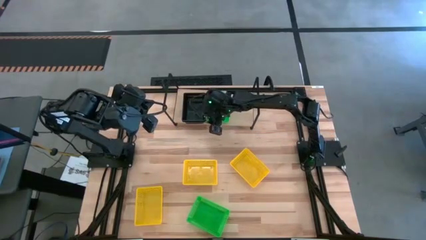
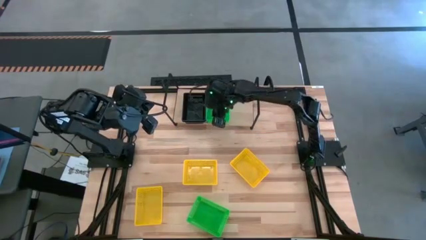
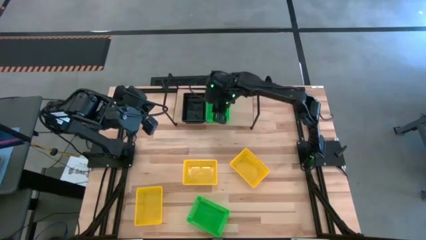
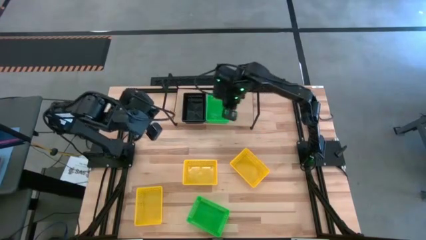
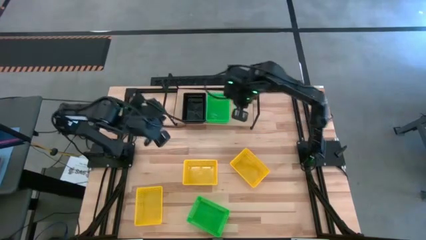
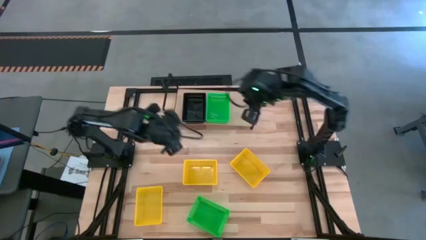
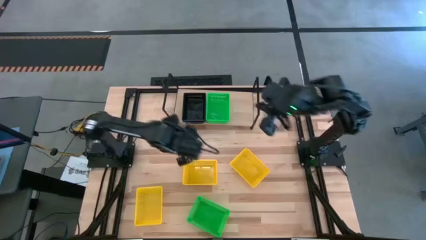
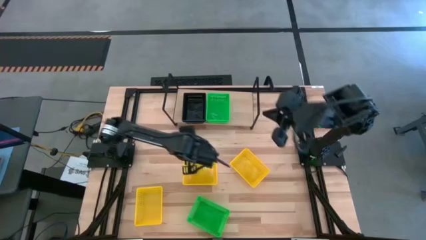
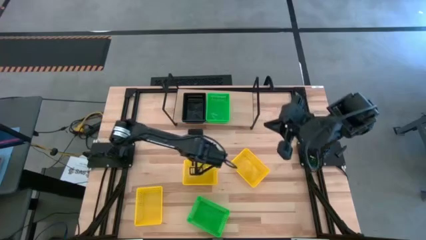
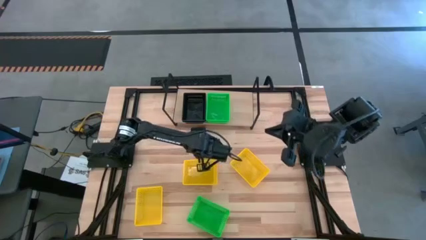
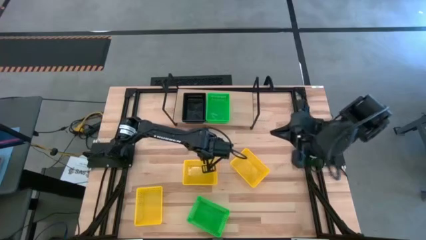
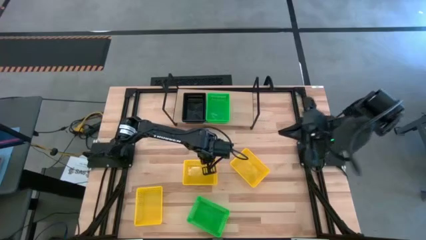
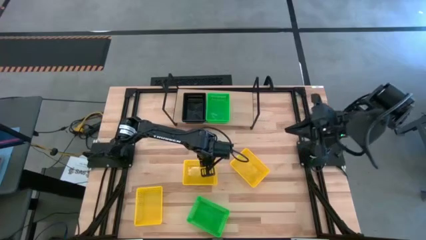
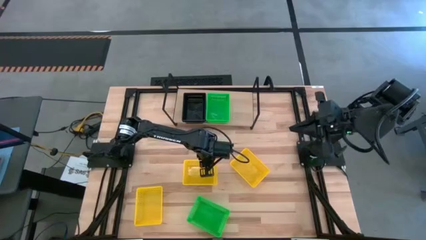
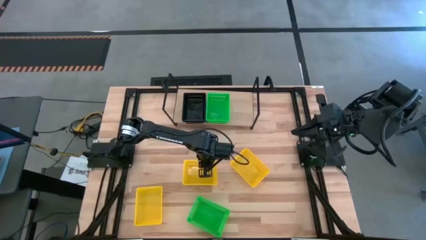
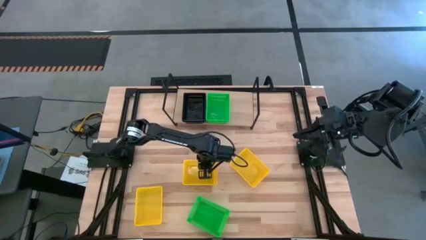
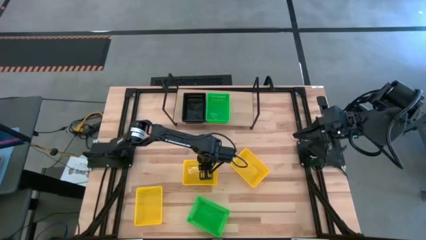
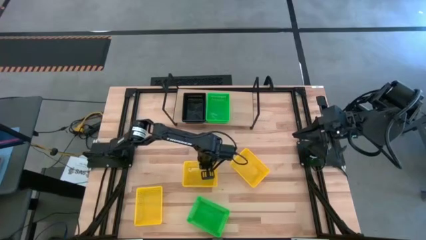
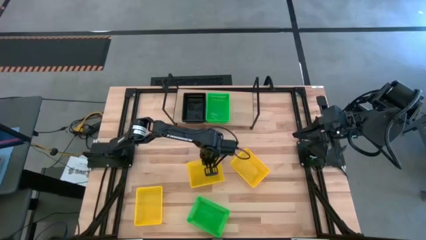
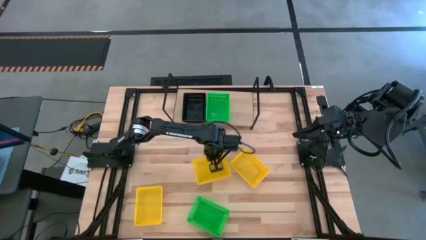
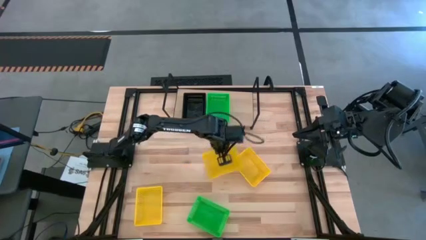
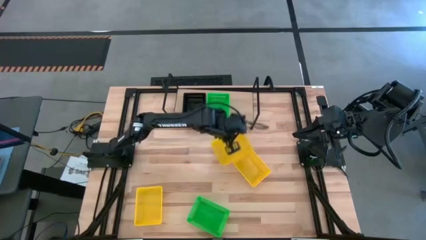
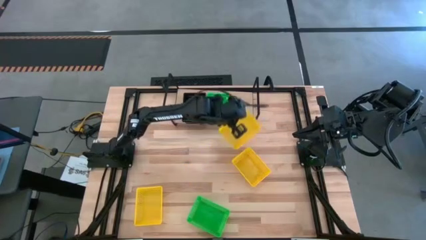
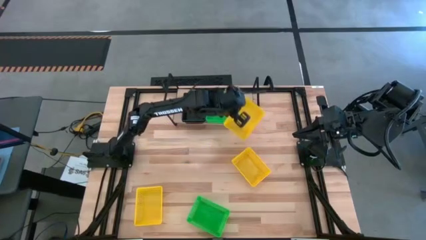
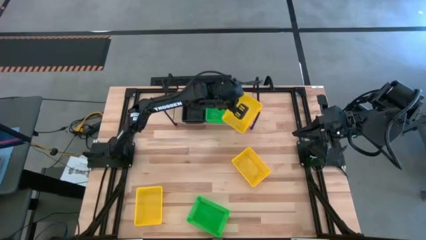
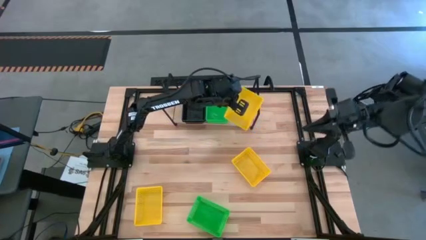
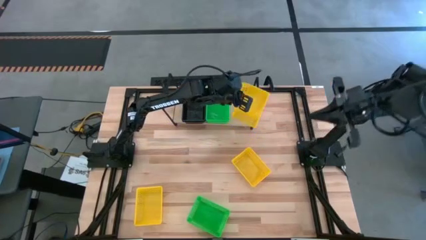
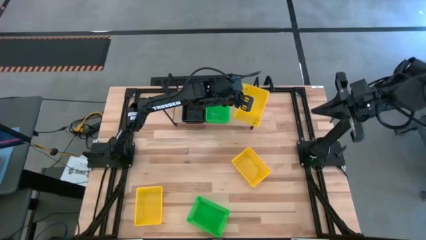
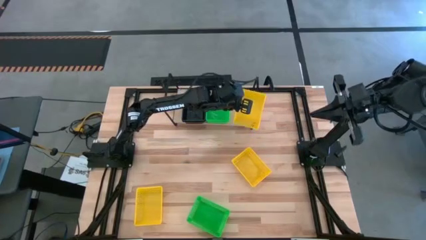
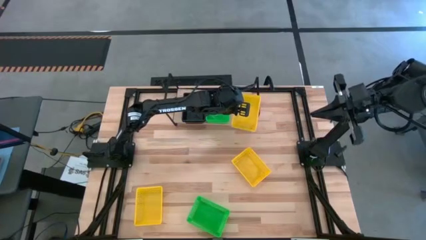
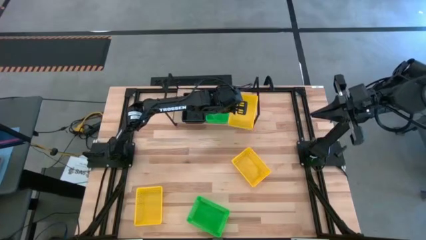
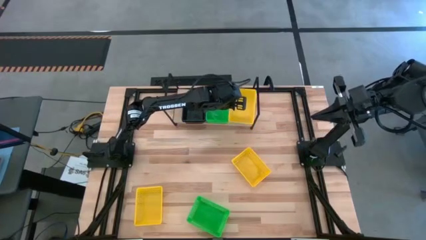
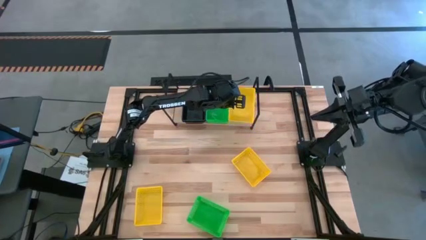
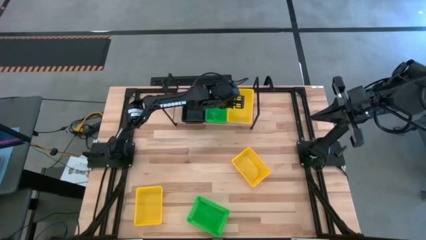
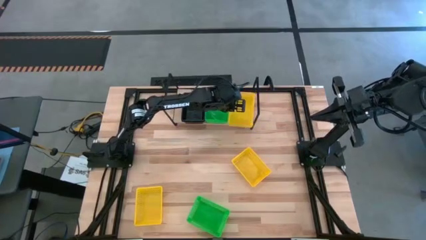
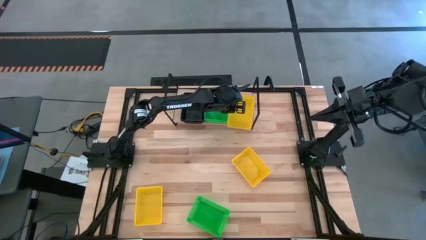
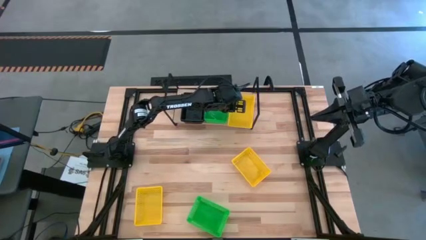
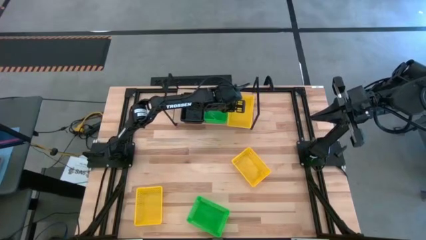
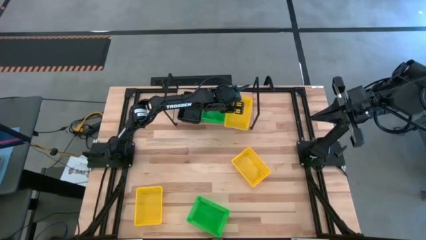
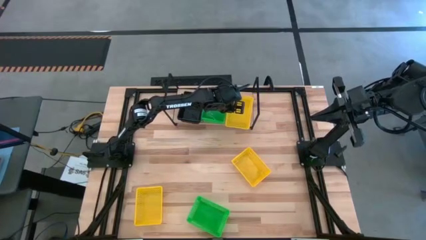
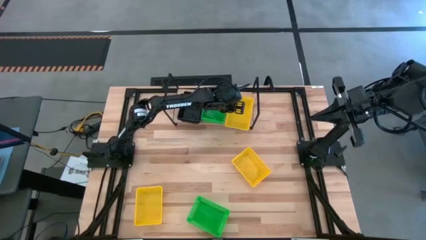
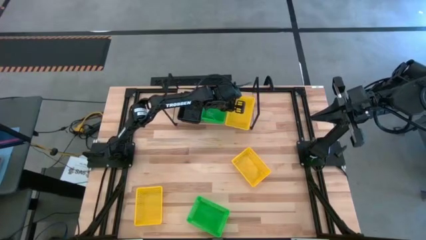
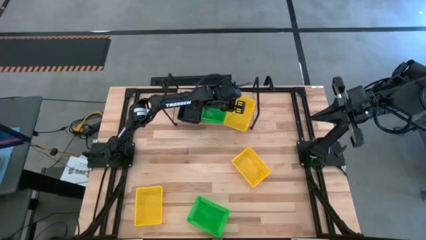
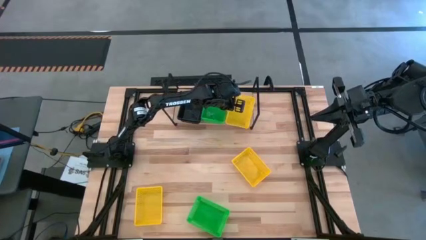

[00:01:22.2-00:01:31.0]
Task: Stack baskets on shelf by color
Put the top left yellow bin on the shelf

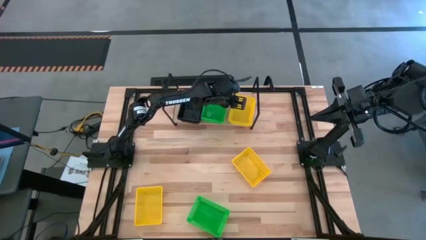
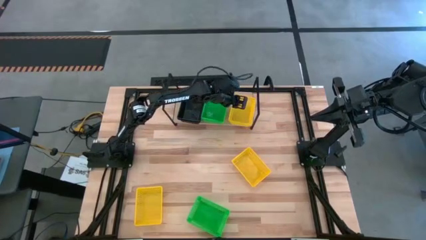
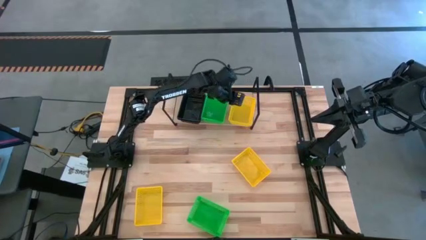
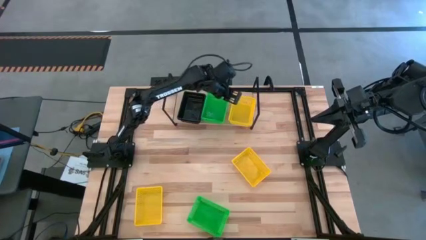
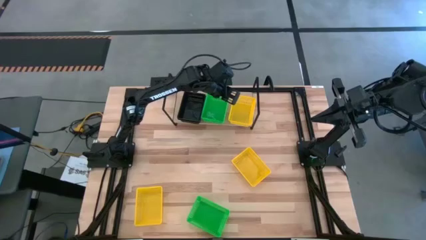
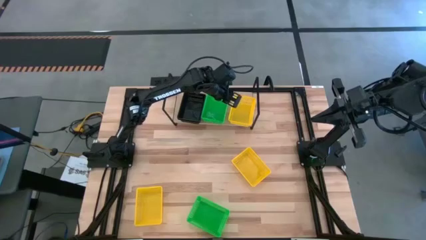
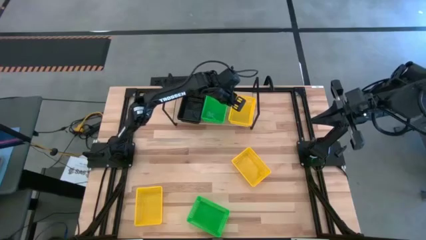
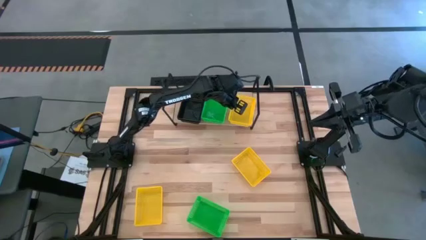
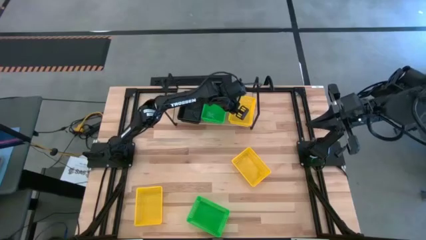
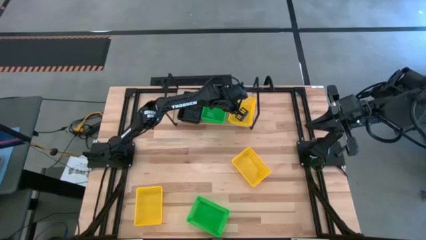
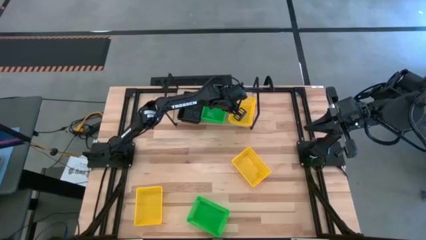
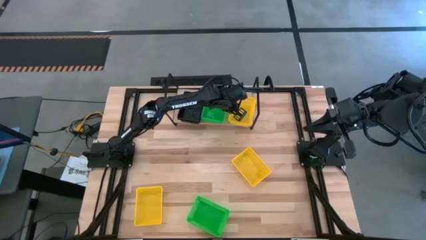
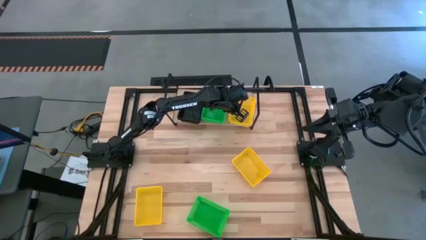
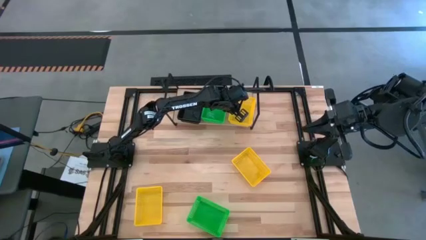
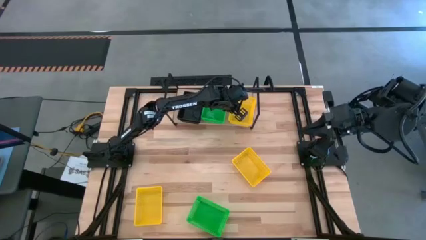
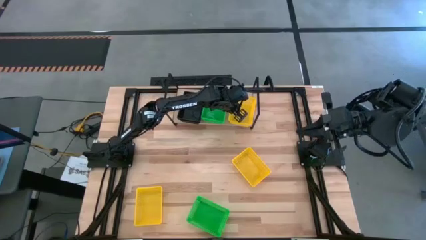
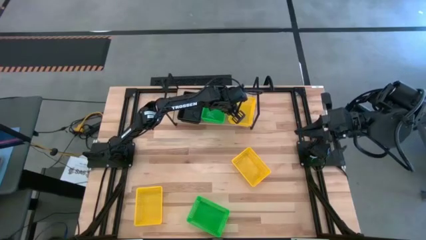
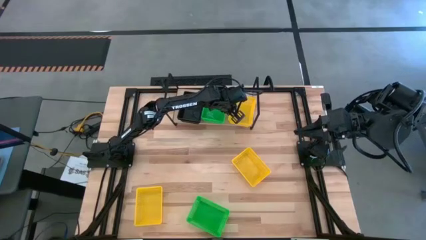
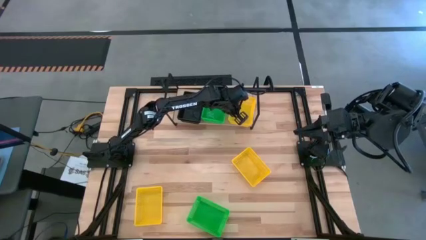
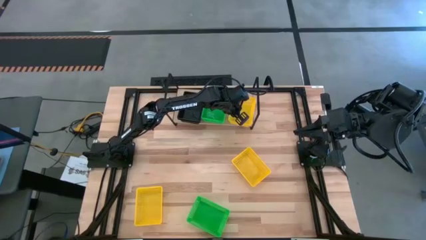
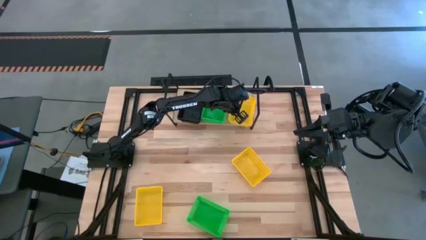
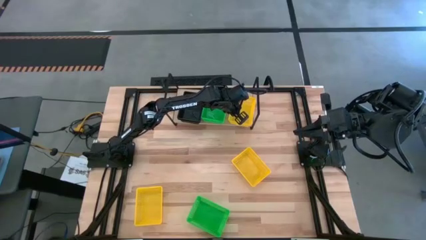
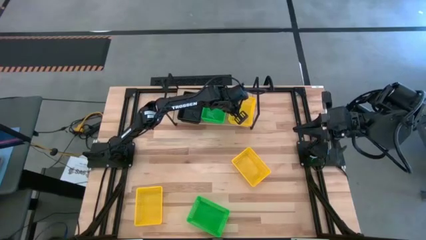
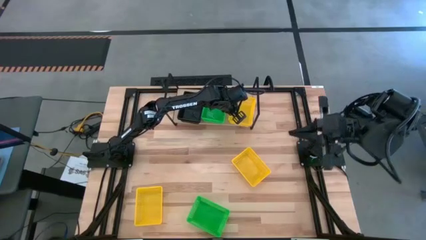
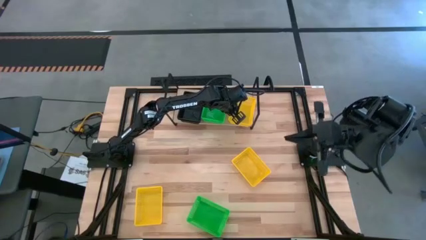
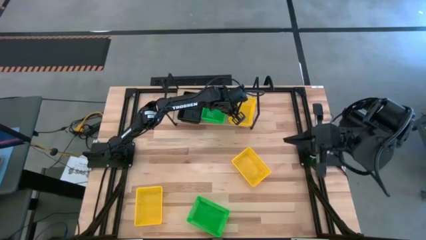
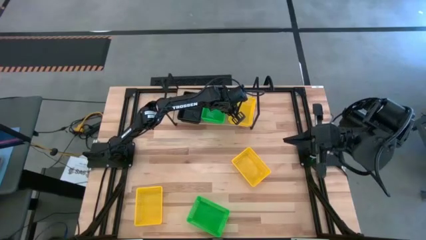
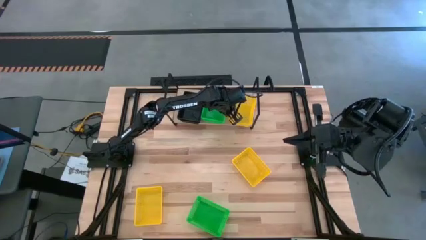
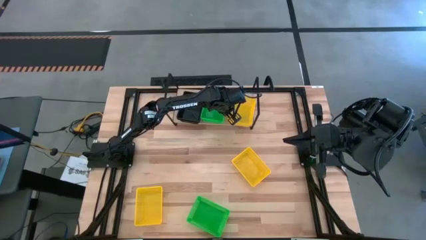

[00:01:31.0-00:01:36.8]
Adjust the green baskets on the shelf

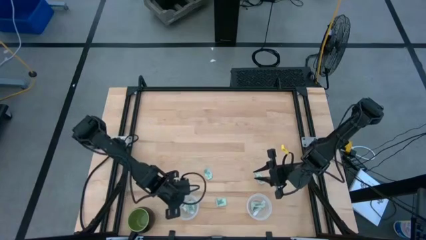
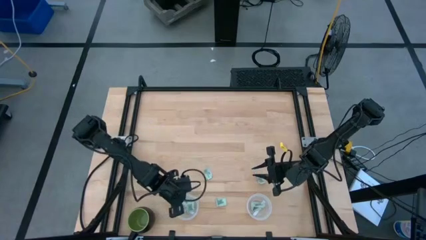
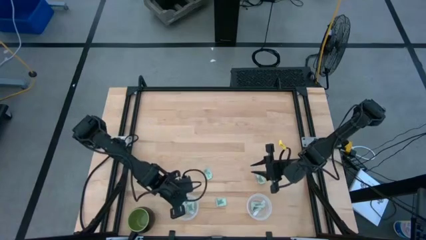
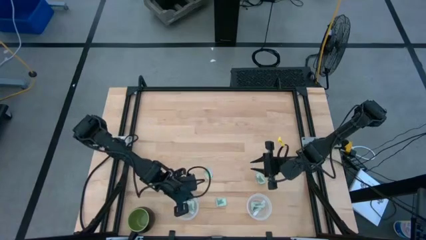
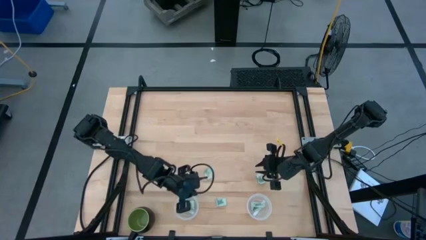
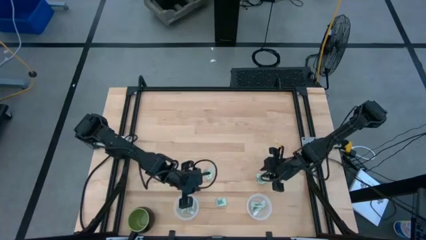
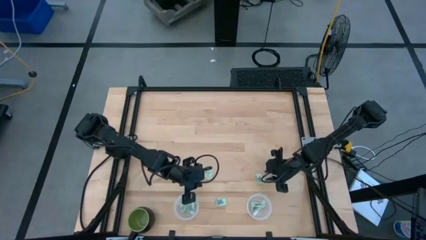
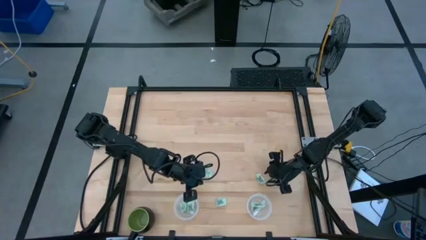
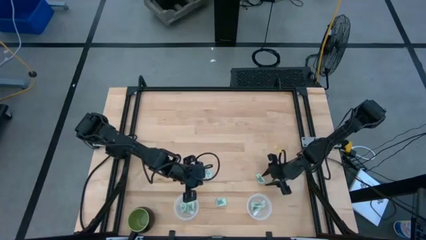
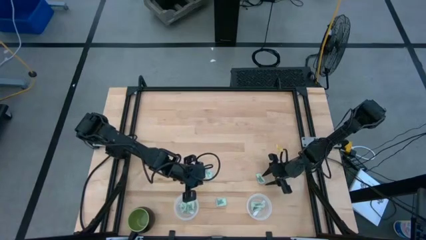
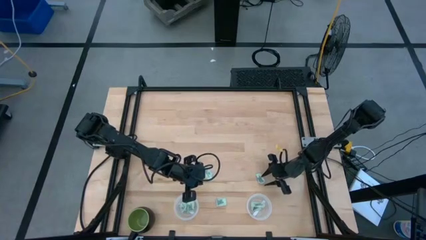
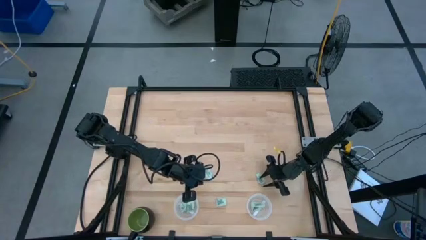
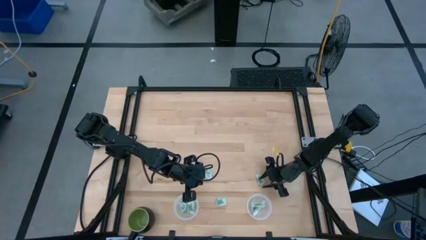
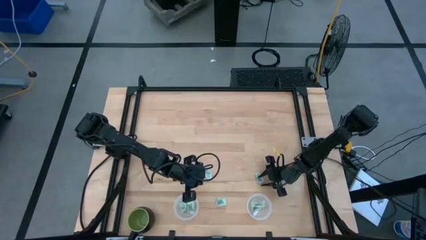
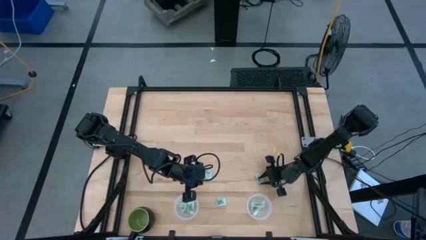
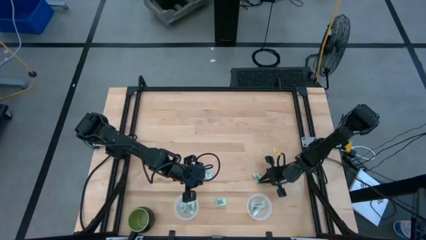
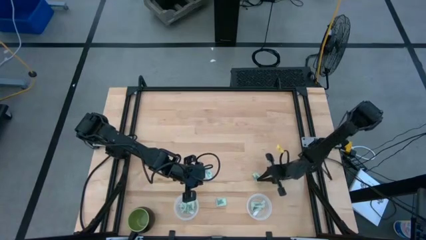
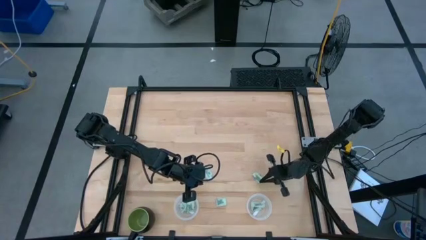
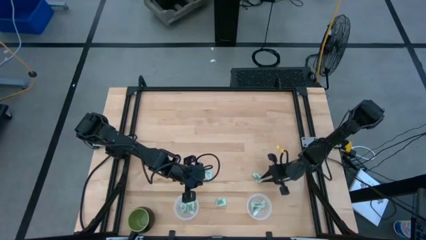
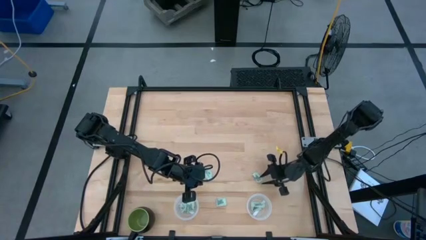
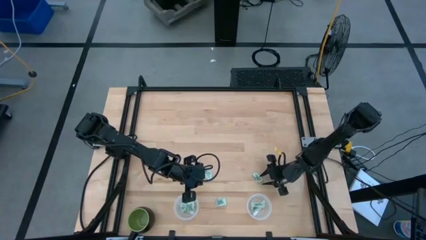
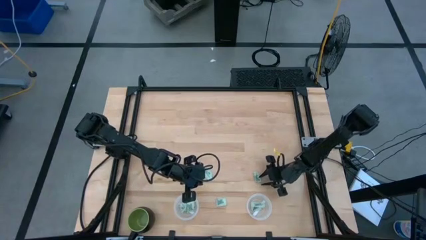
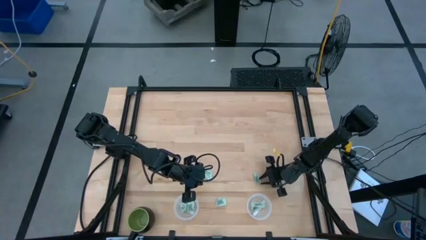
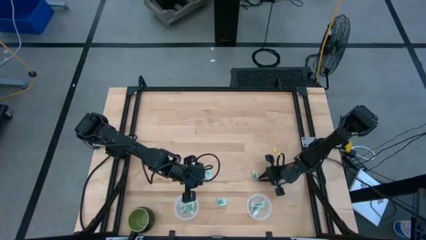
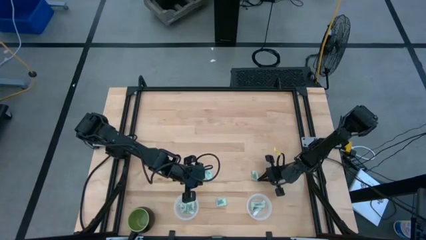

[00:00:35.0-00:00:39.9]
Task: Pick and place Stevia / Truvia into bins
Put the stevia packet into the right transparent container
